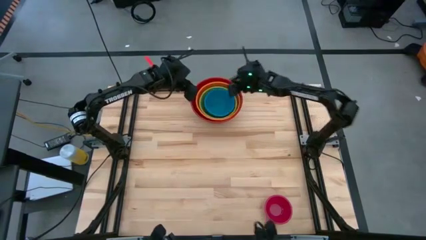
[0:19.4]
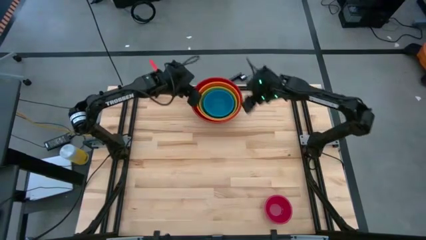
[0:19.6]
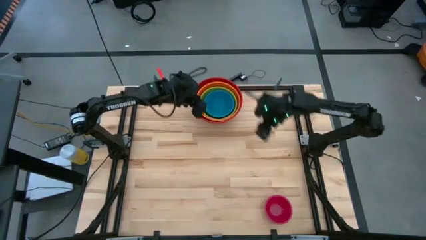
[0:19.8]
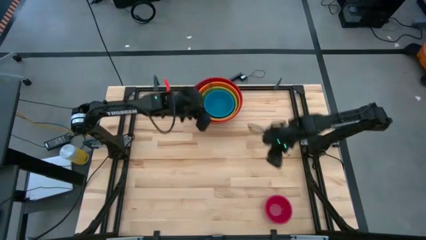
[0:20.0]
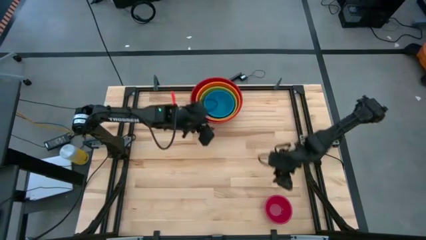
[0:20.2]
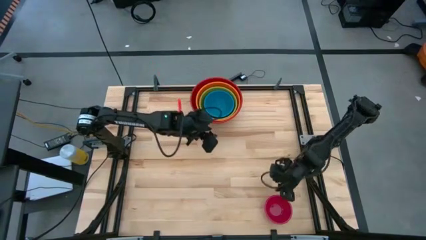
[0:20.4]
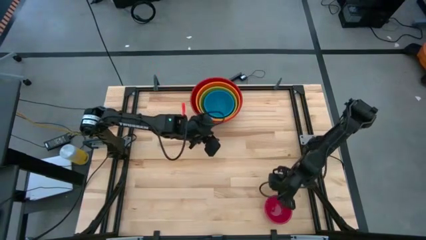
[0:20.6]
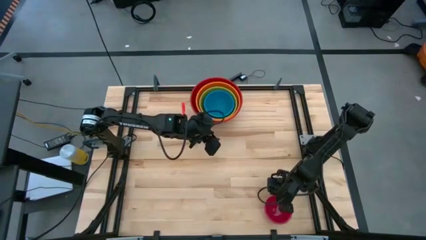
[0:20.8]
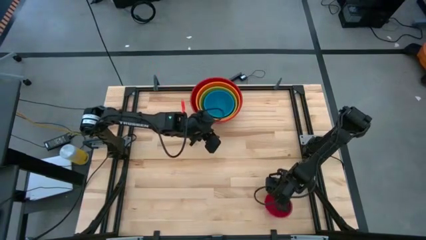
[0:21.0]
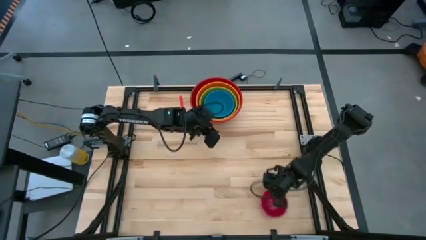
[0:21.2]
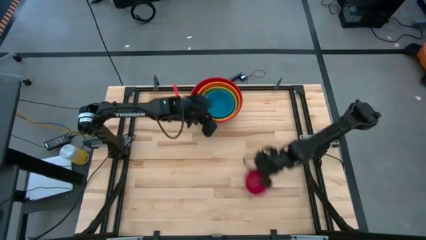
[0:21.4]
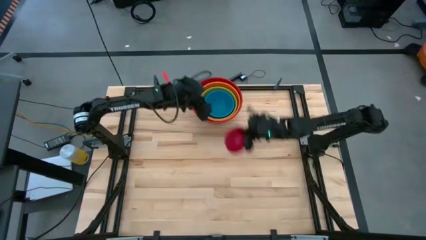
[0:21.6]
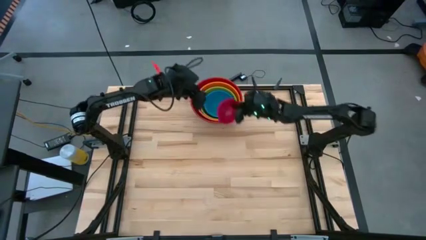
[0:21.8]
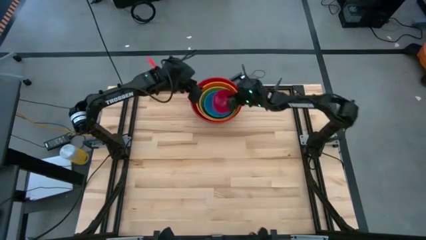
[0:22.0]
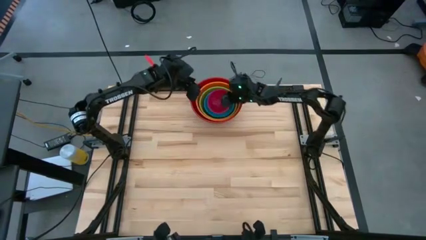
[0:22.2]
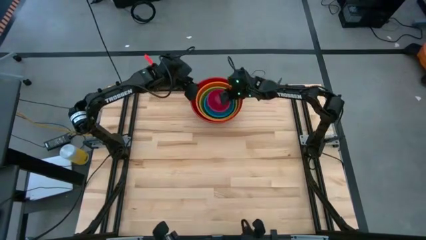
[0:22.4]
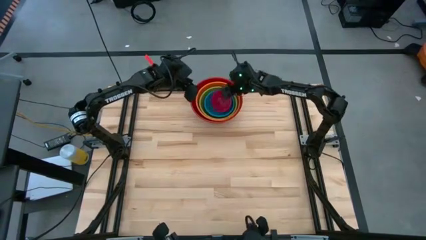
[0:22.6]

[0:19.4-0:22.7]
Stack the pink bowl on the blue bowl

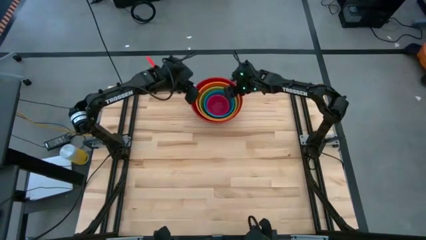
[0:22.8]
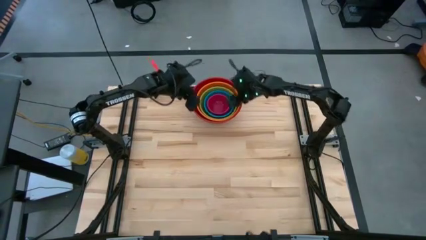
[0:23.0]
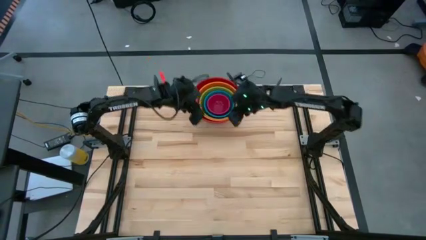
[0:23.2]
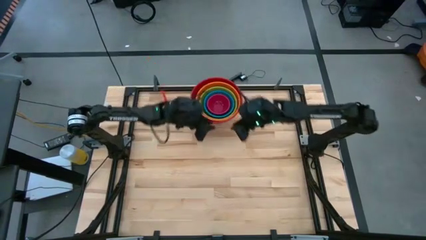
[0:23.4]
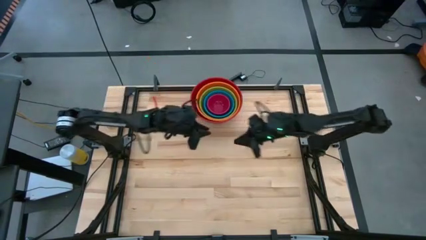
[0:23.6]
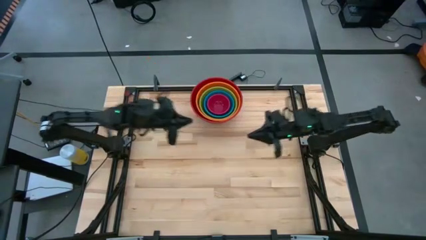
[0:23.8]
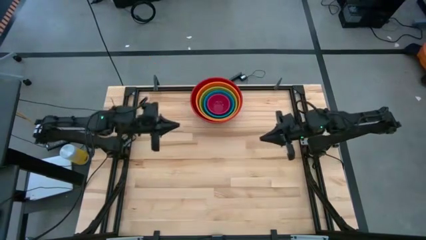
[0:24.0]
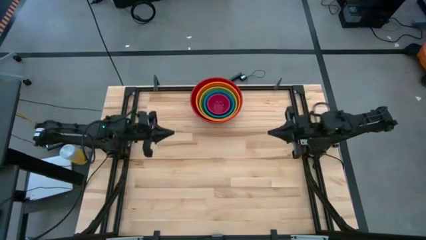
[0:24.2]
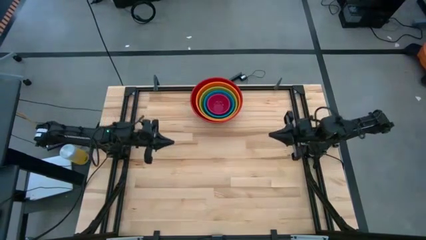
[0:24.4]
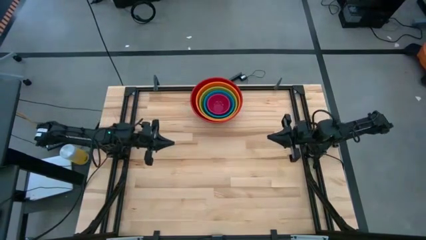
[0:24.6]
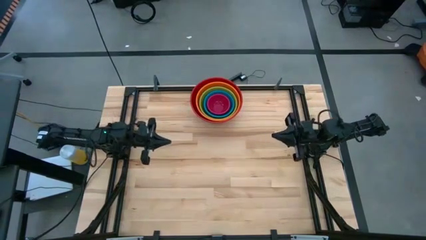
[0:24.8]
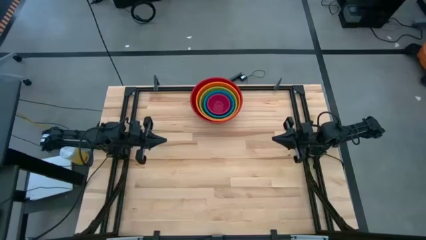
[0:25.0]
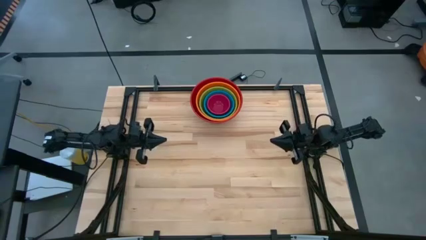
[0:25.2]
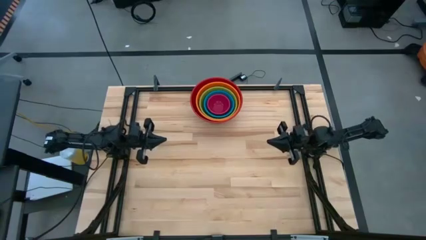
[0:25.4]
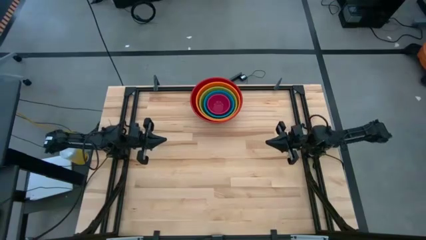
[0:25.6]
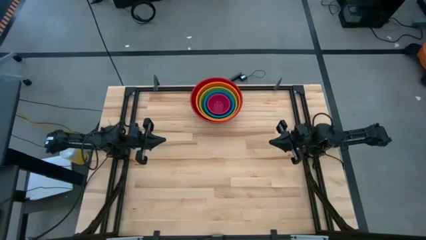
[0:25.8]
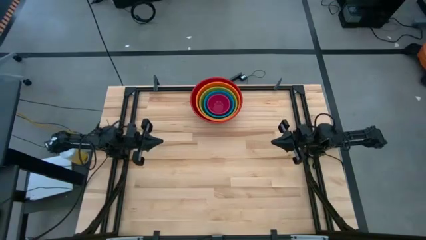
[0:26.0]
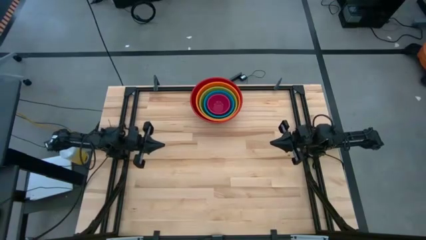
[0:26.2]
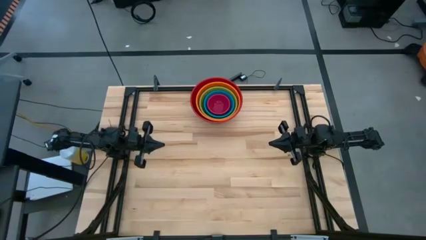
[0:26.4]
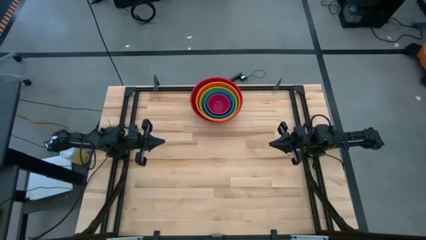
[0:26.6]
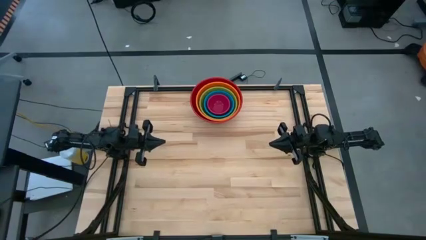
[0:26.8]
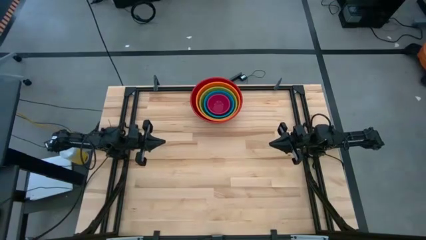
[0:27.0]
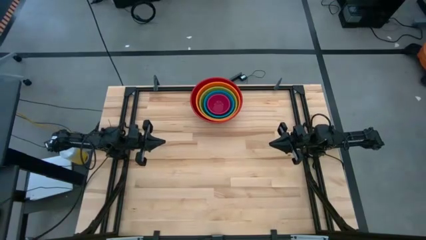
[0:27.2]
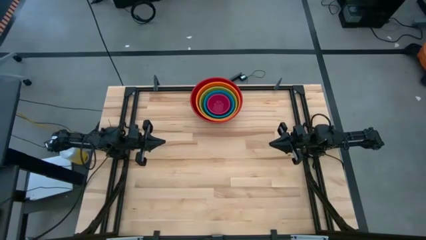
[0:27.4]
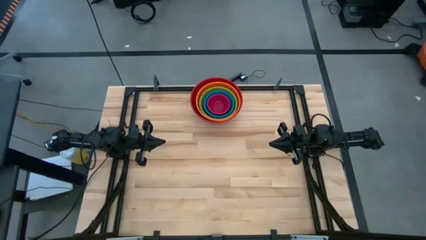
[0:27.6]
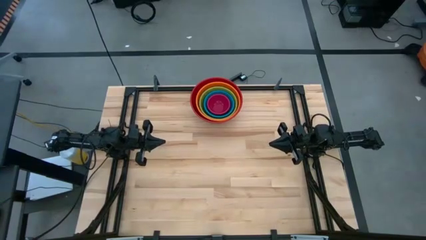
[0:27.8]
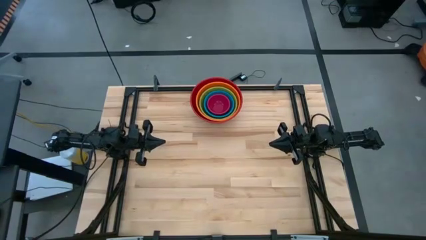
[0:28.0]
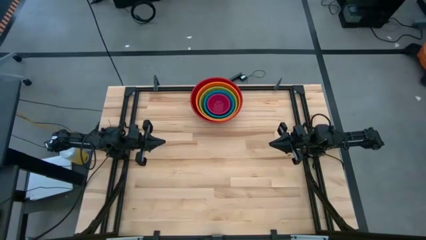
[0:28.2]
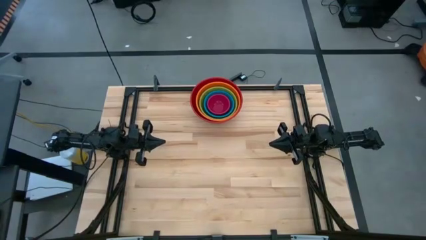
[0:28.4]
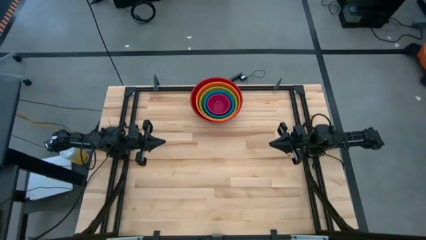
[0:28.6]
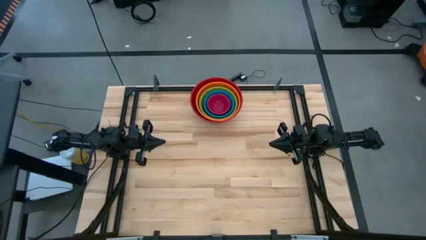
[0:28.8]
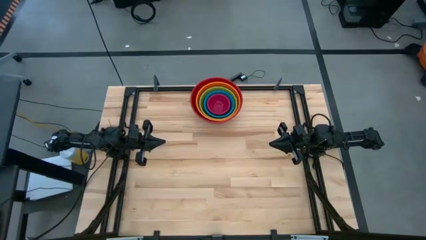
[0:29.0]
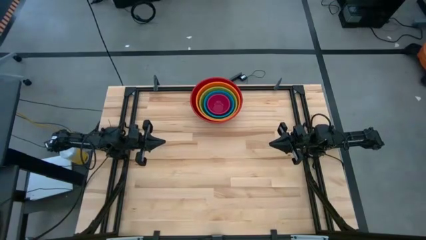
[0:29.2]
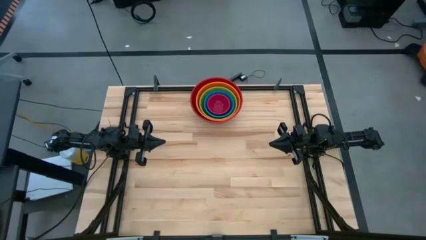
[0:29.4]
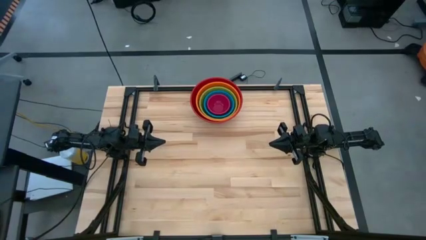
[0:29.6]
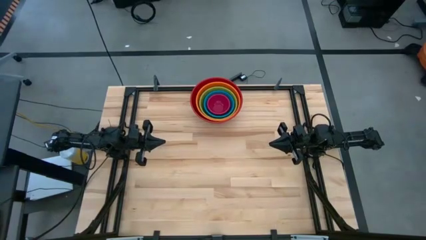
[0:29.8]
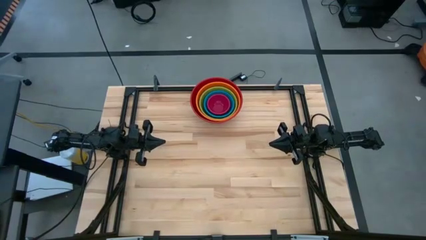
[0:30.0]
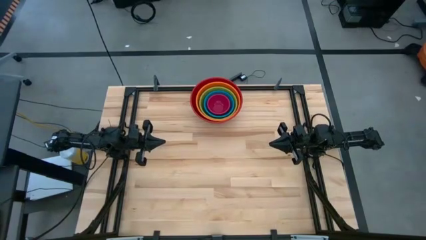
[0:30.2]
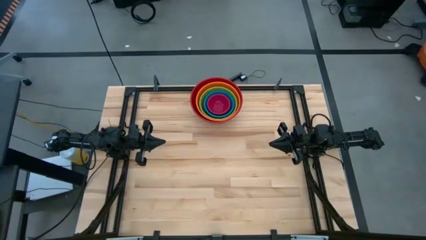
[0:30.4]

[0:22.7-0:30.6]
Return to Home Position
